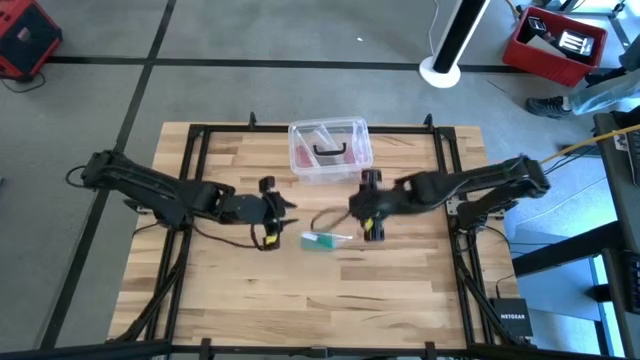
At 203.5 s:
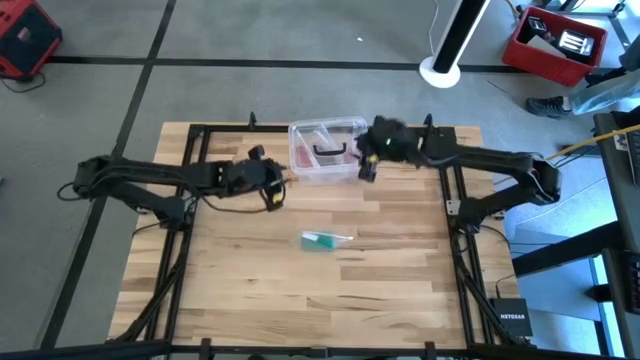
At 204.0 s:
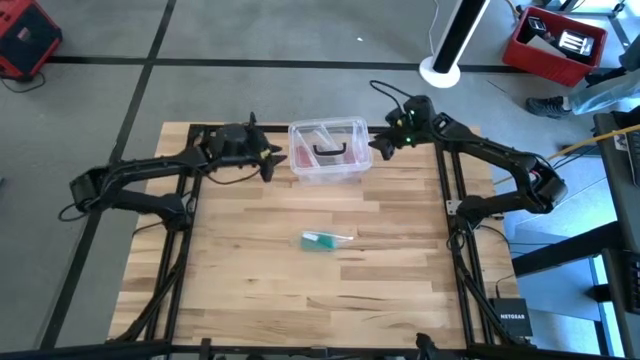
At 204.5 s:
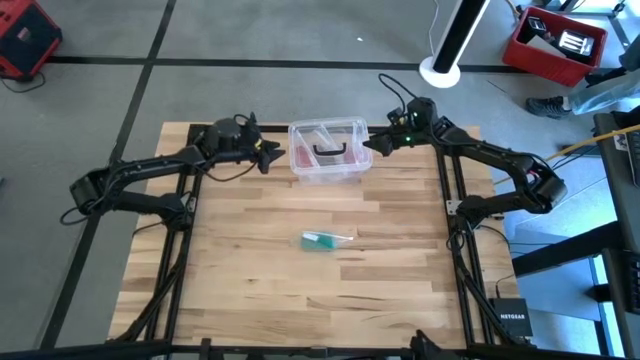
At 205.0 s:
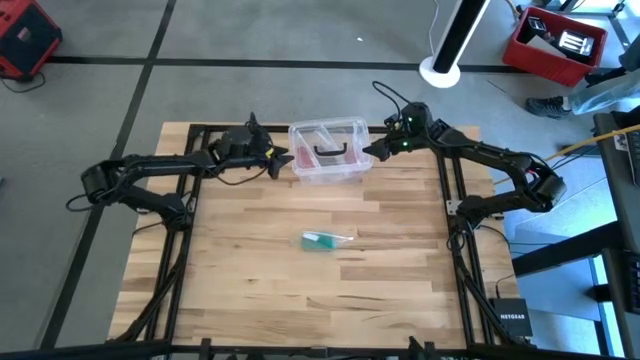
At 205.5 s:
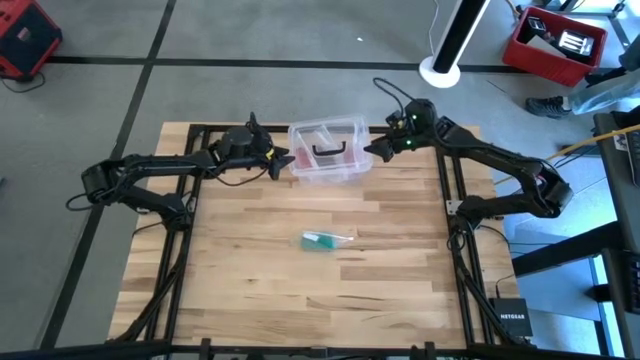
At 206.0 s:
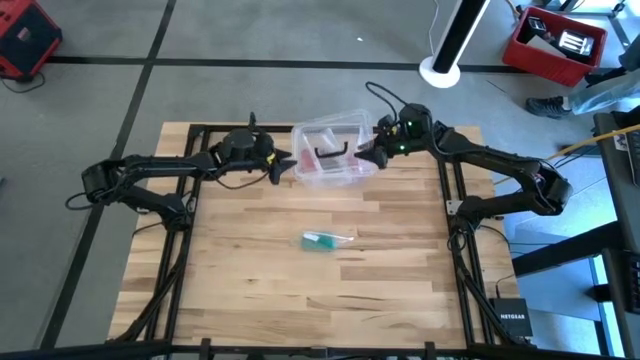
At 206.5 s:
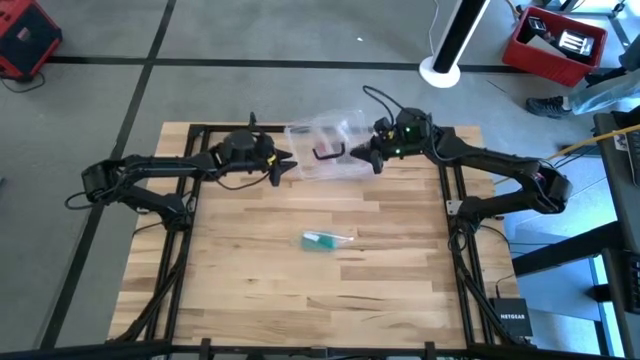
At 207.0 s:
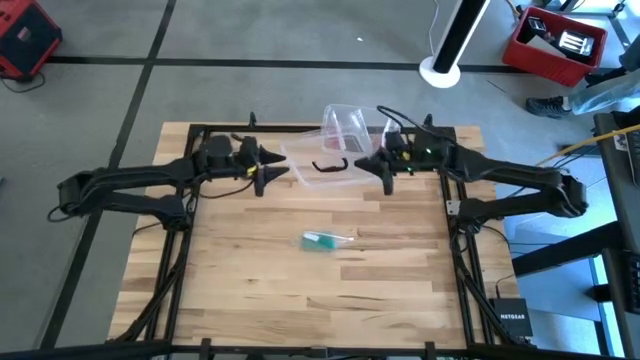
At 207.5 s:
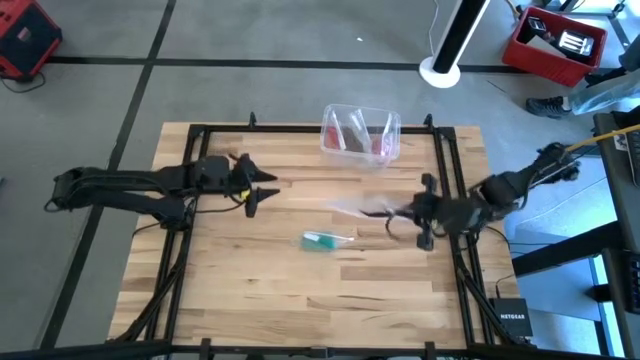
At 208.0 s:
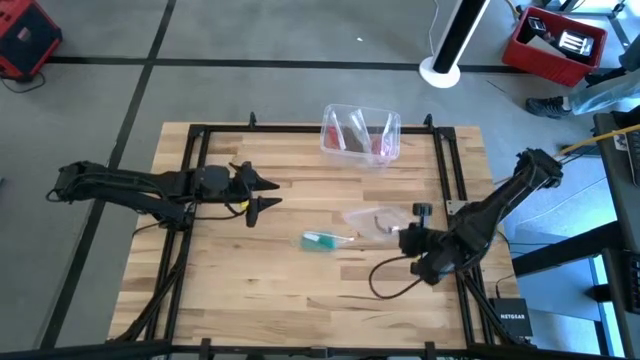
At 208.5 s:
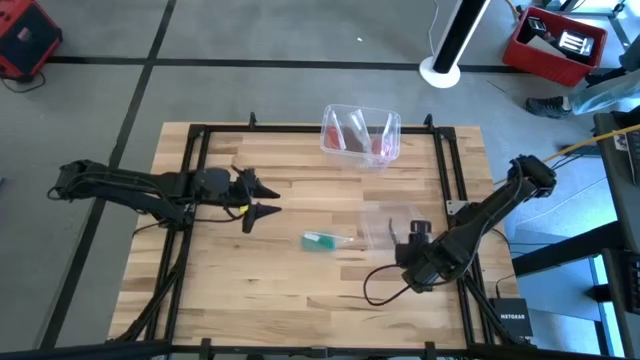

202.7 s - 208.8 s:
Task: Roll bandage
Remove the transparent bin lid

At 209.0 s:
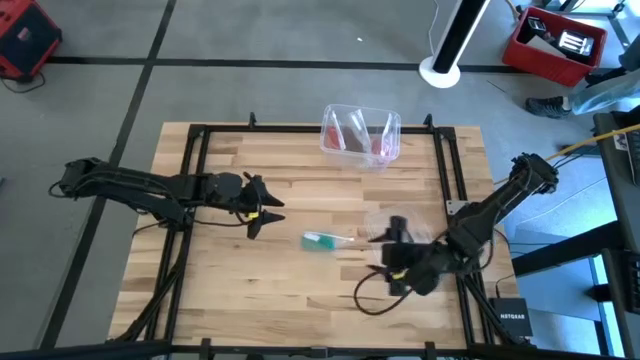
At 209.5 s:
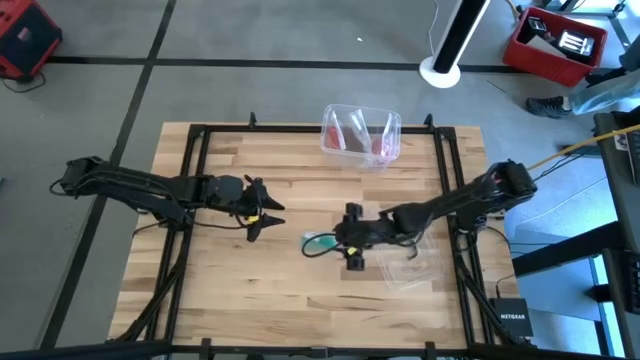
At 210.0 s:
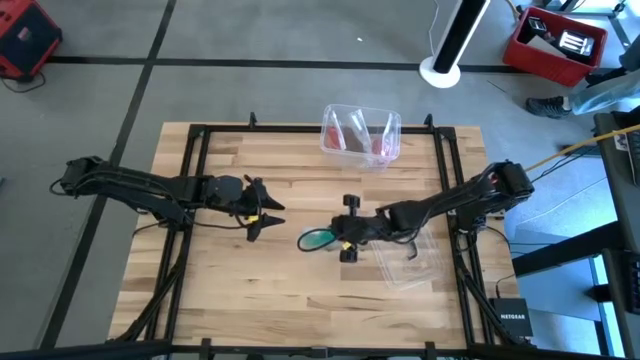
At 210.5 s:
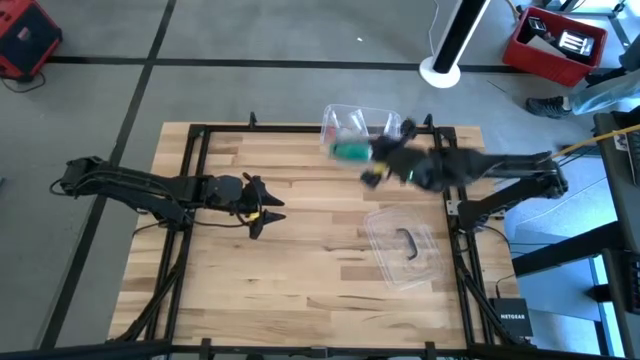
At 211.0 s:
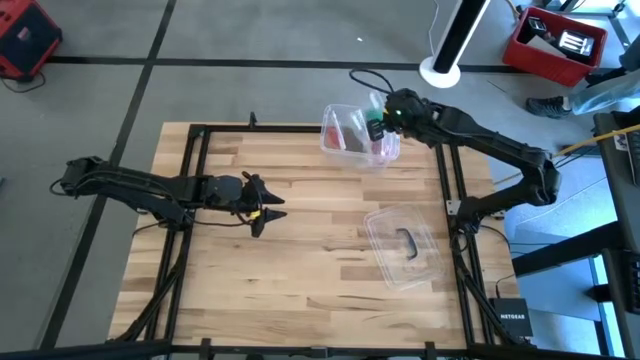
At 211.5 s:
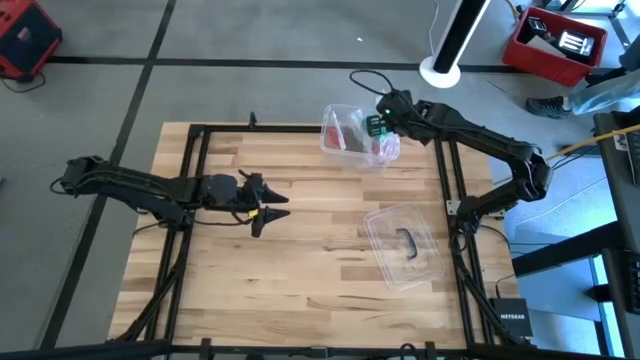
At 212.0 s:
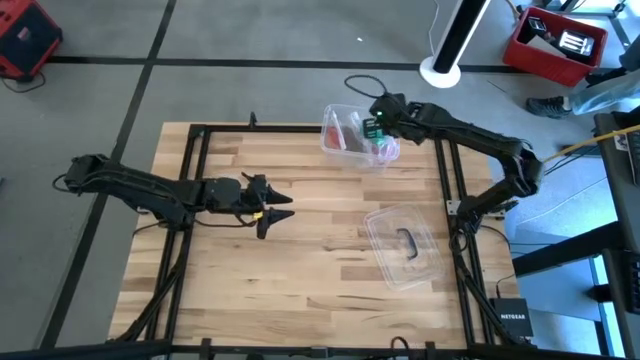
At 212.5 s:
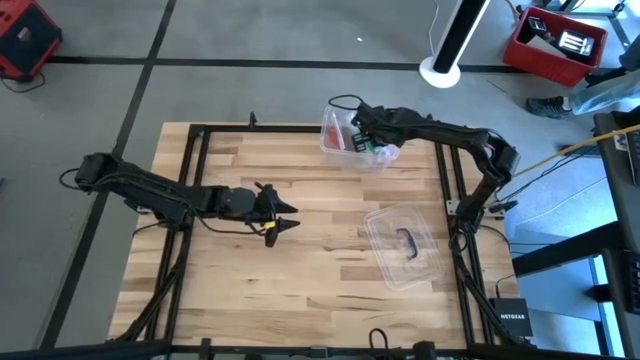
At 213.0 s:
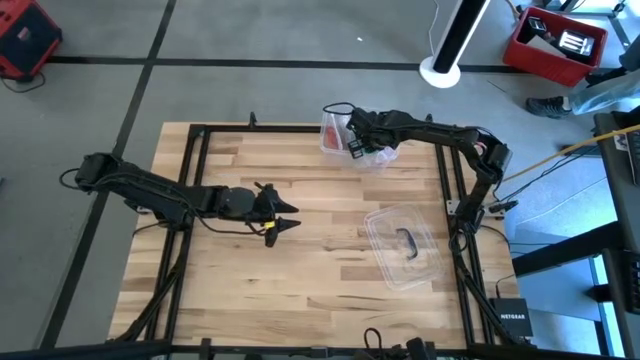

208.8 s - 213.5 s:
Put the zip lock bag into the transparent bin

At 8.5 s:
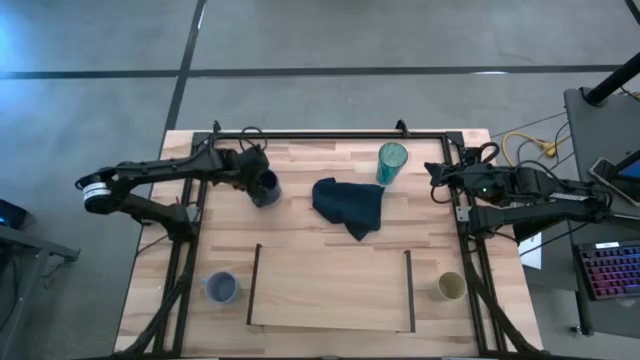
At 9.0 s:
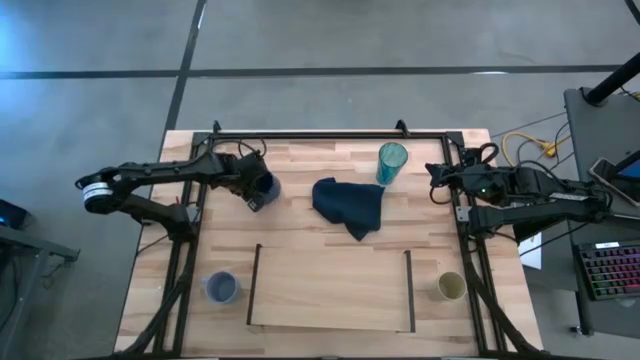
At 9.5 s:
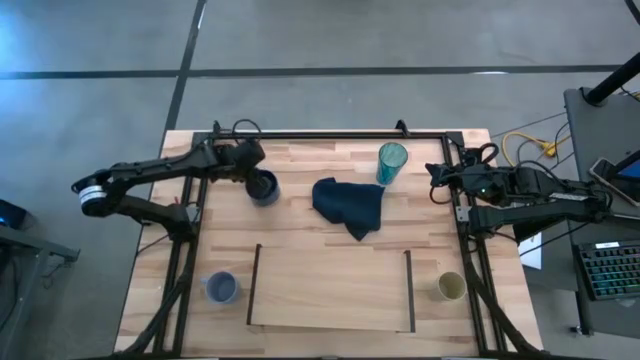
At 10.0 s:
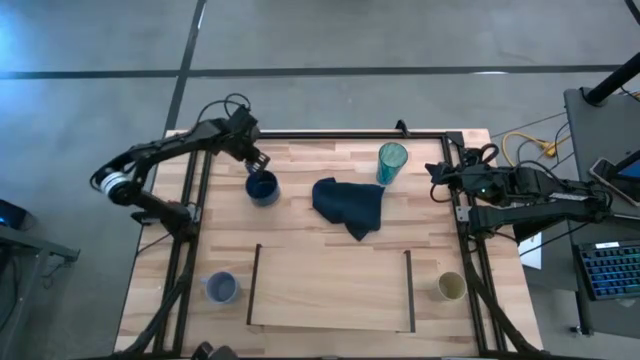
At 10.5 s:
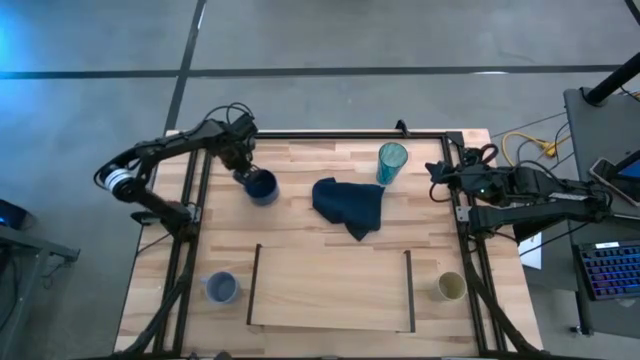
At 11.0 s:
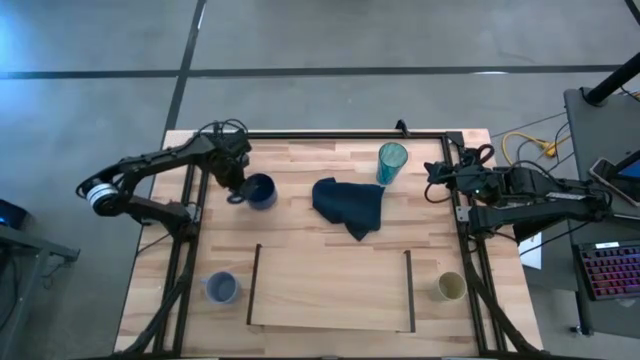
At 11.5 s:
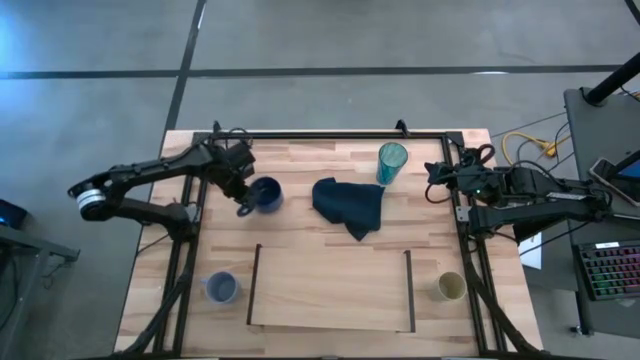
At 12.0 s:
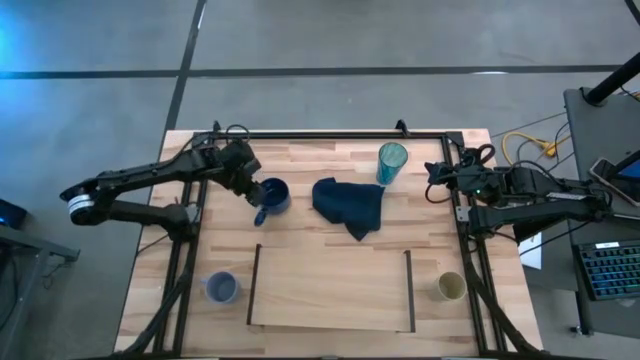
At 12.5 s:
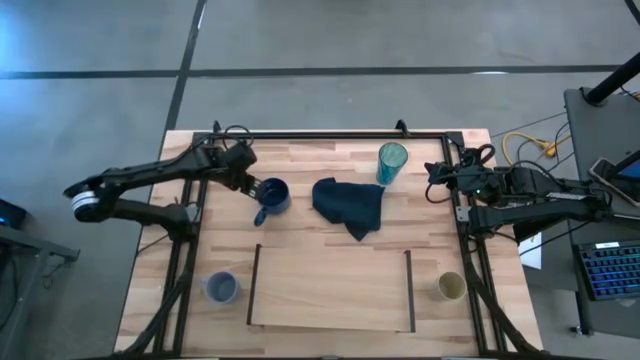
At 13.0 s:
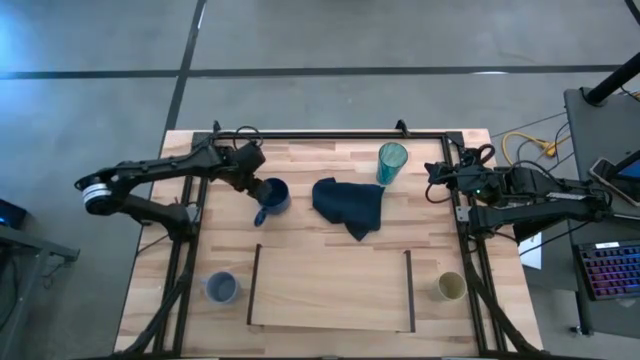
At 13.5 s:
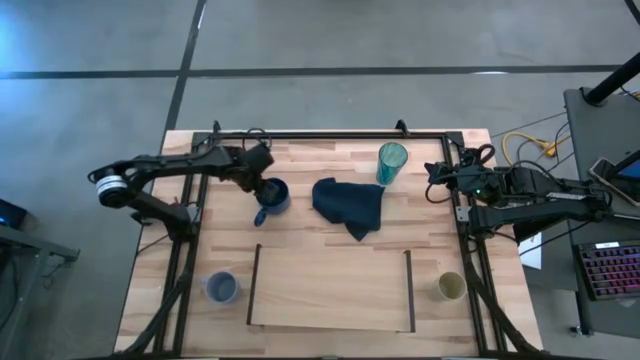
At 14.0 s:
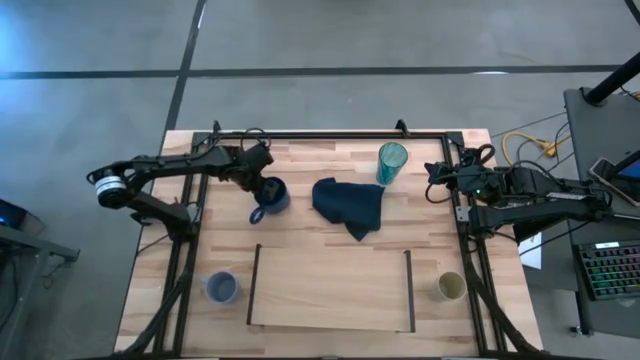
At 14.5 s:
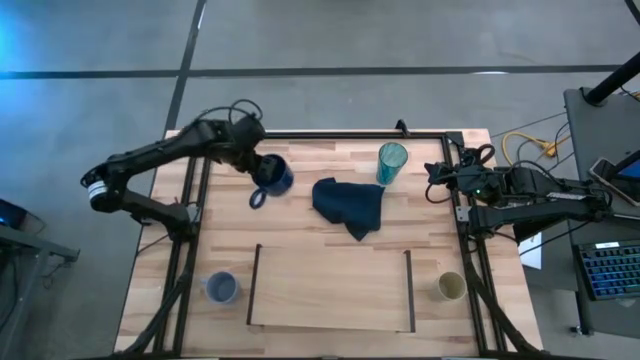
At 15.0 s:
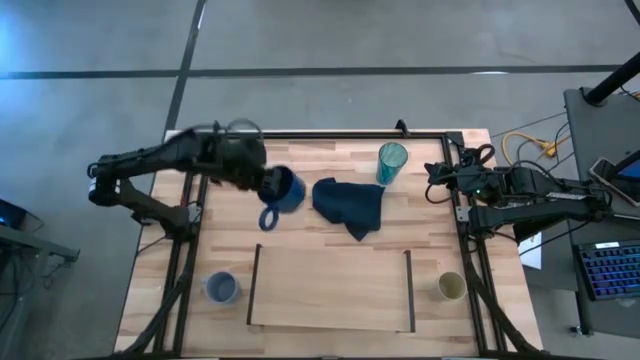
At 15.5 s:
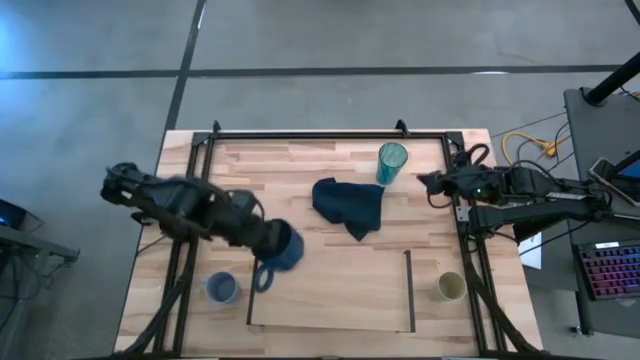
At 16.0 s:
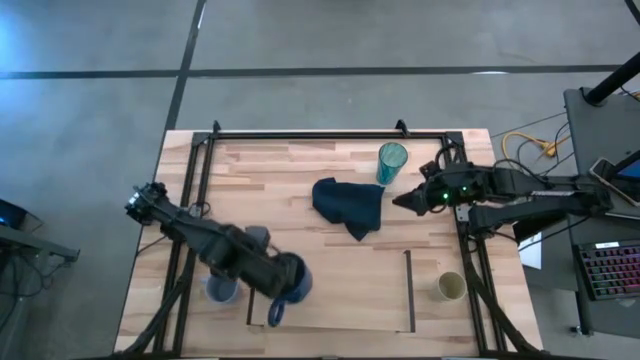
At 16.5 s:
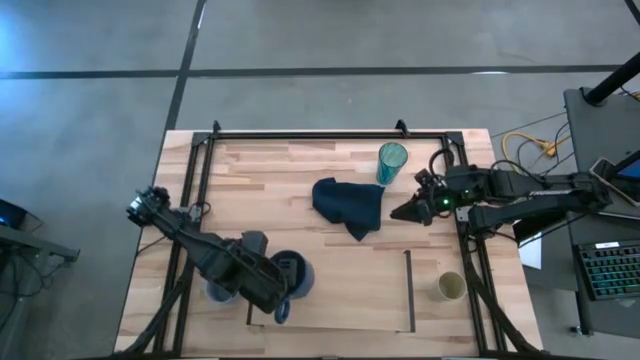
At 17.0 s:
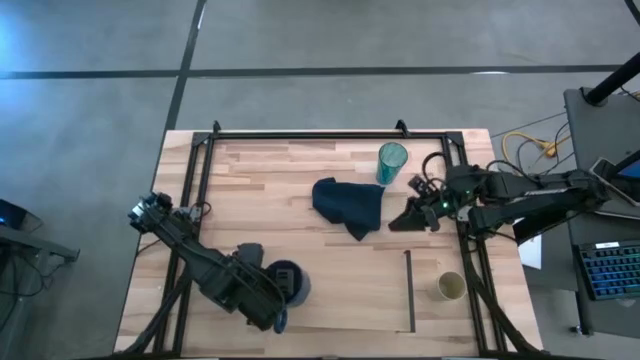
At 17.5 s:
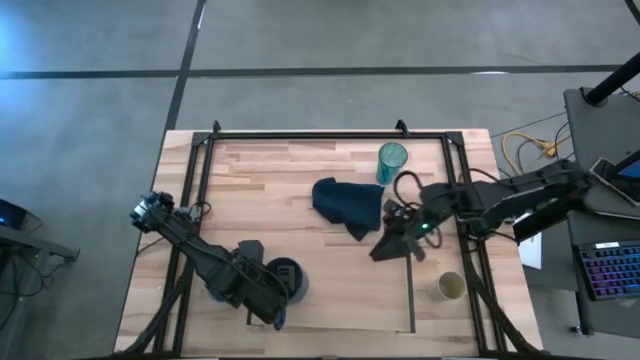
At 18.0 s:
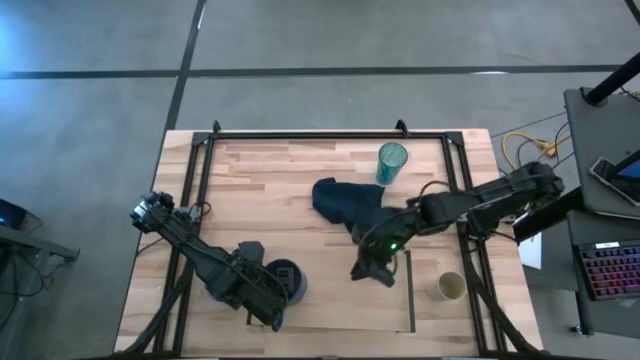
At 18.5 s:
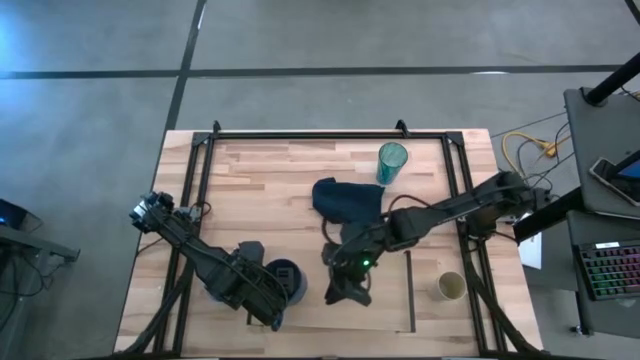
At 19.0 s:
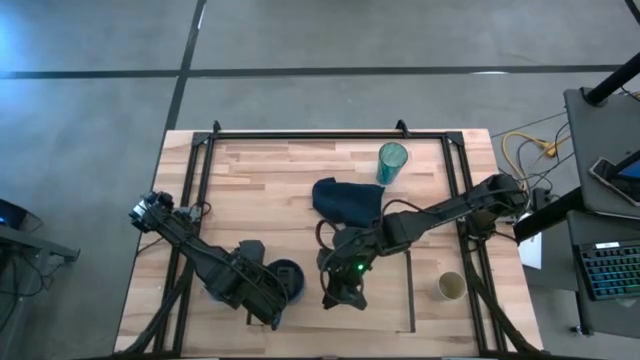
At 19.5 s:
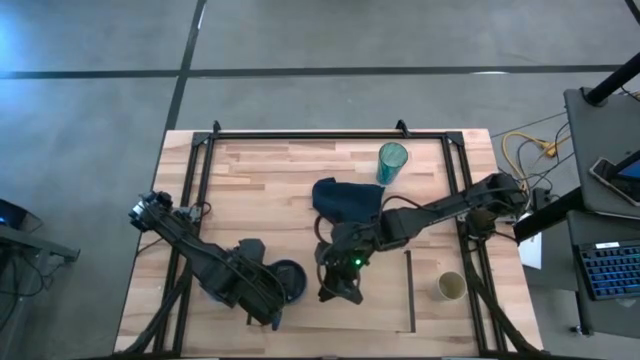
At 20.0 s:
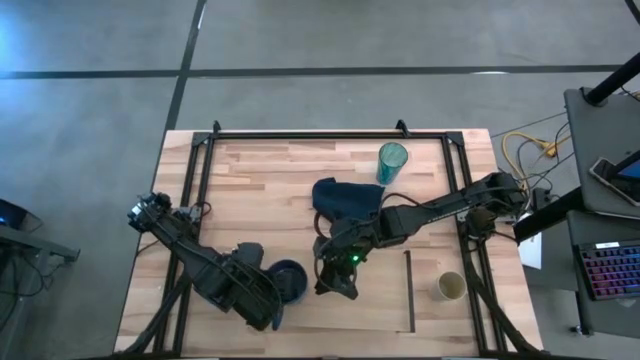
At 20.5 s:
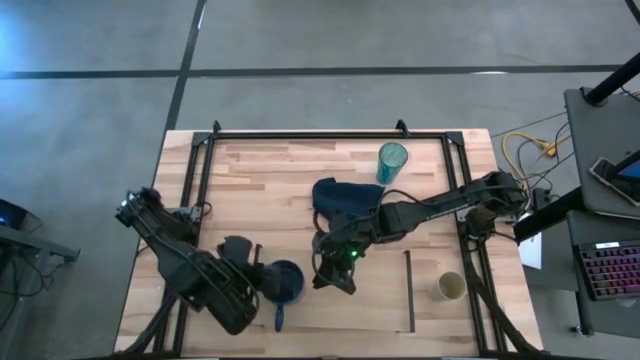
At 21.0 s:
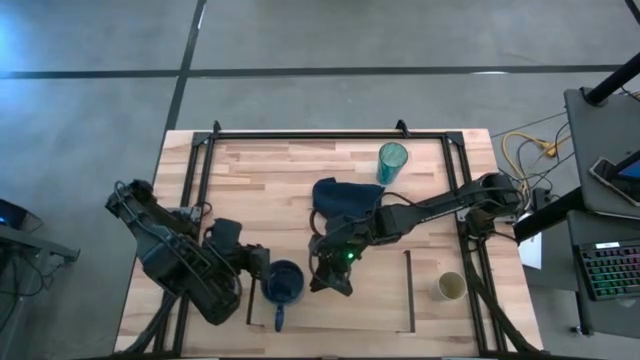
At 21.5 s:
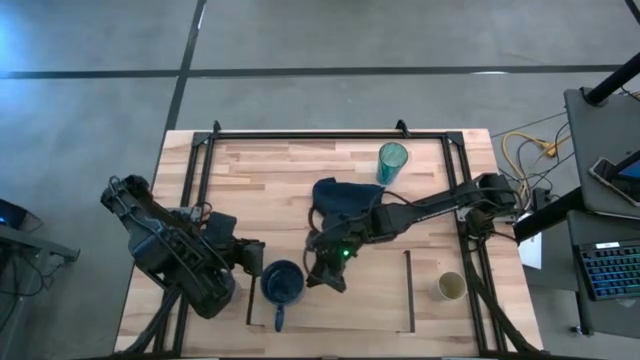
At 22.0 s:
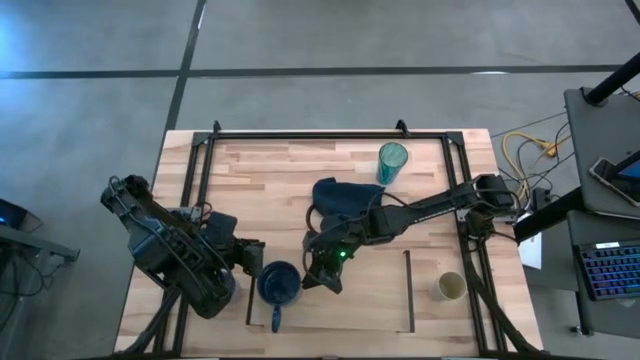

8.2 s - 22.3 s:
Task: Stack small to large cups/mugs on shelf
Put the dark blue mug on the shelf
